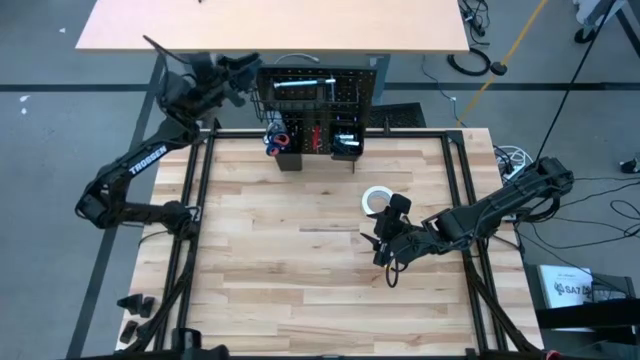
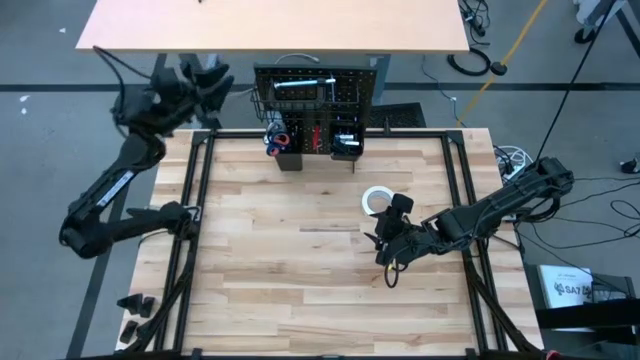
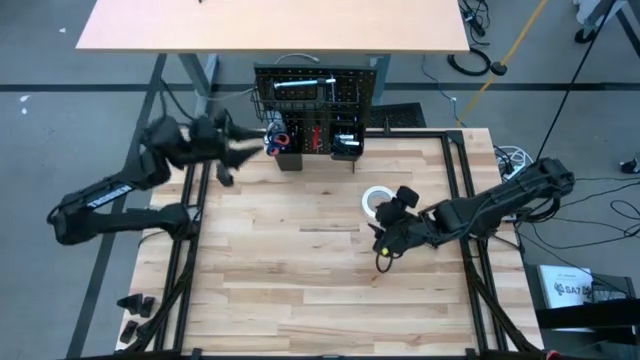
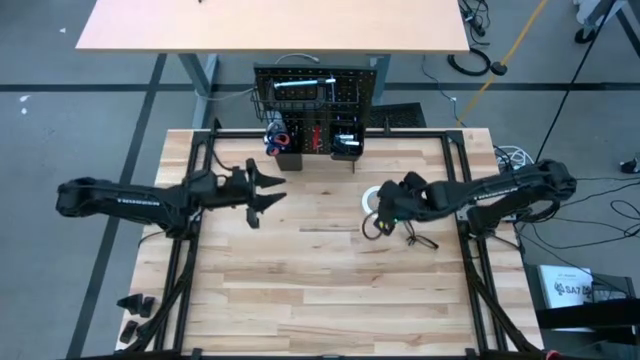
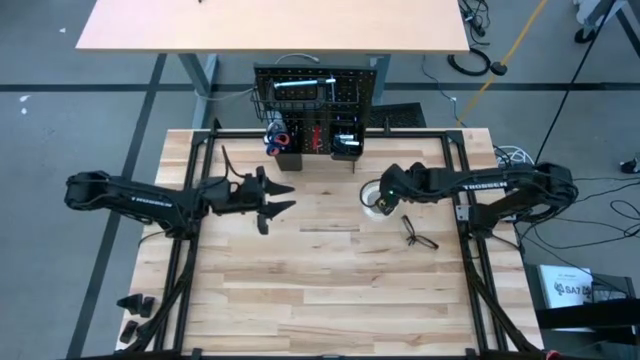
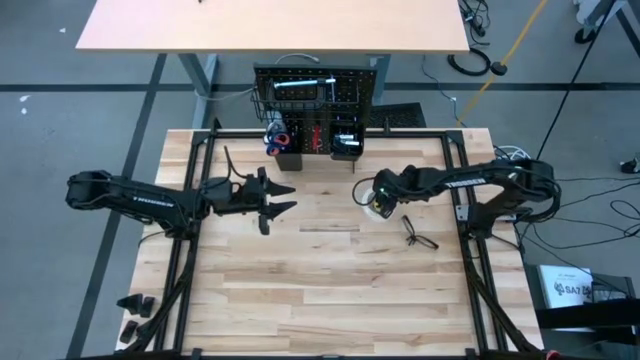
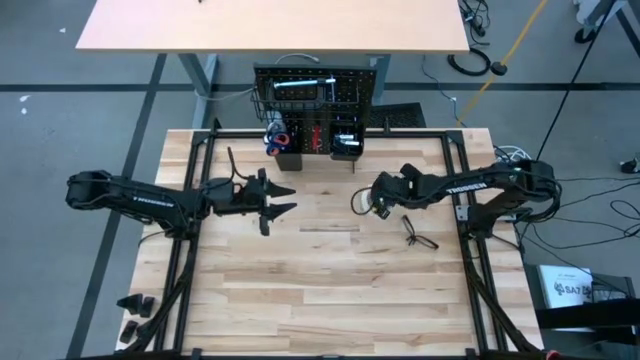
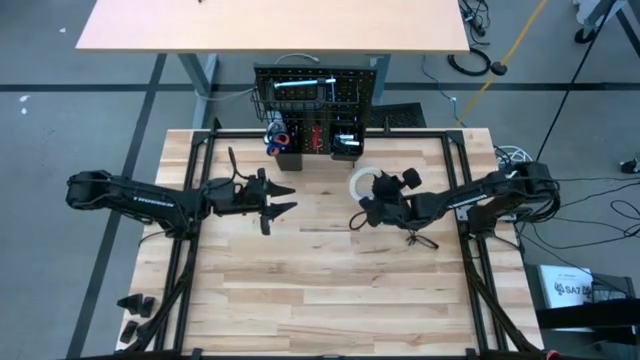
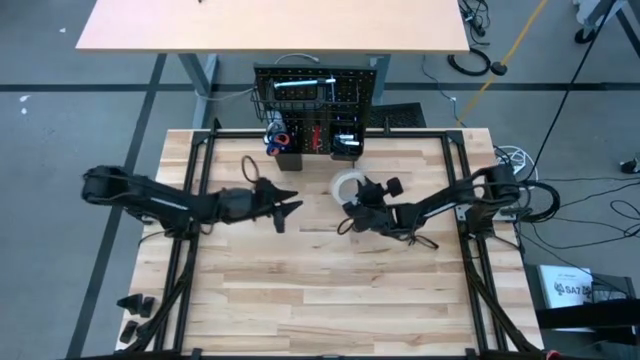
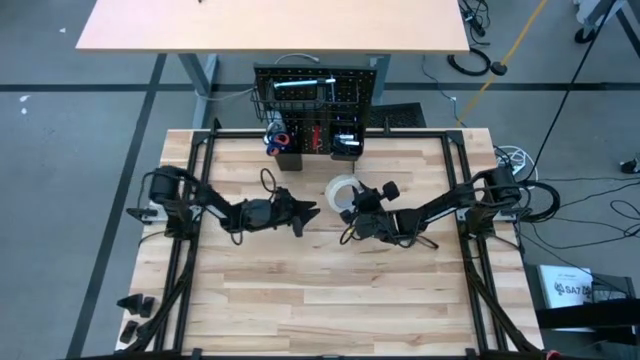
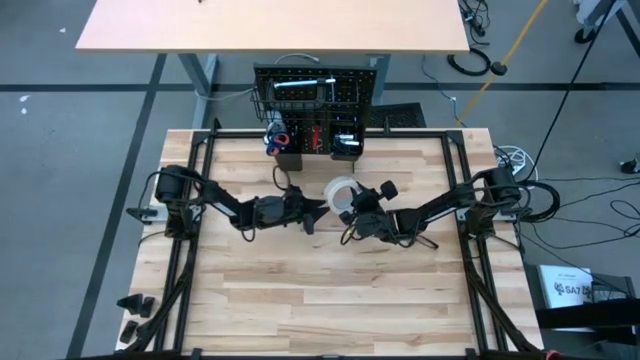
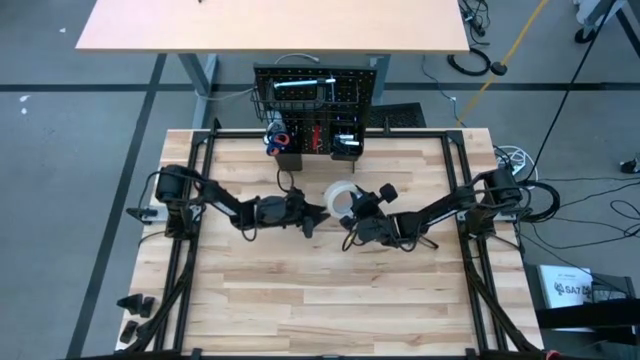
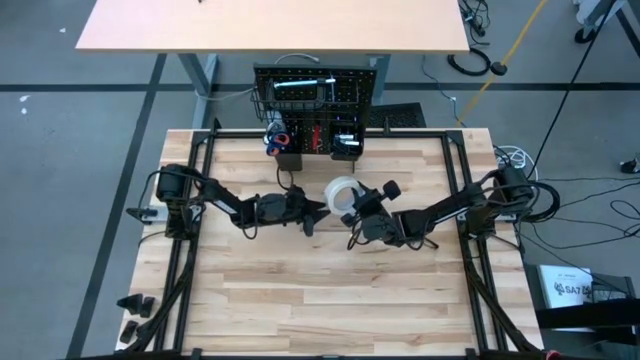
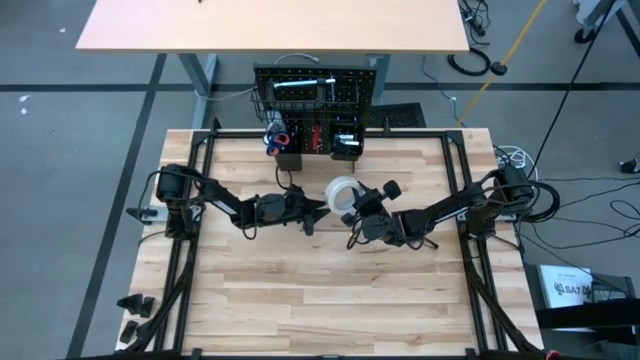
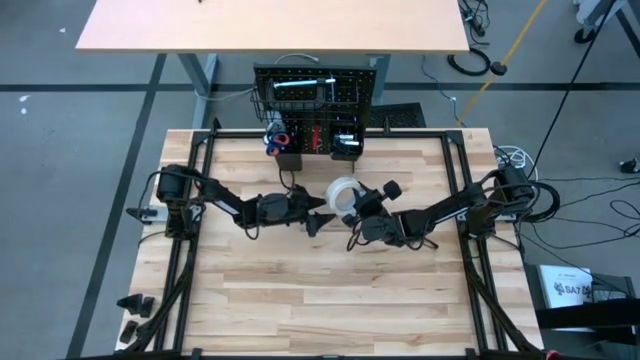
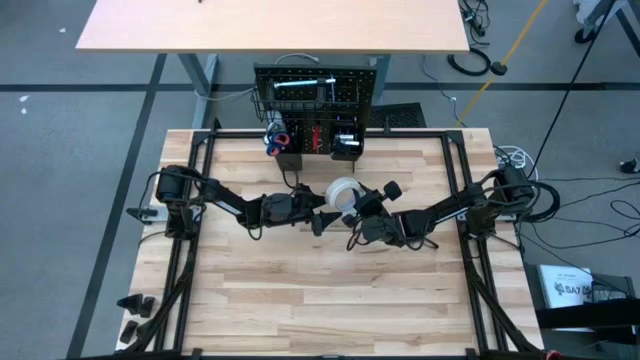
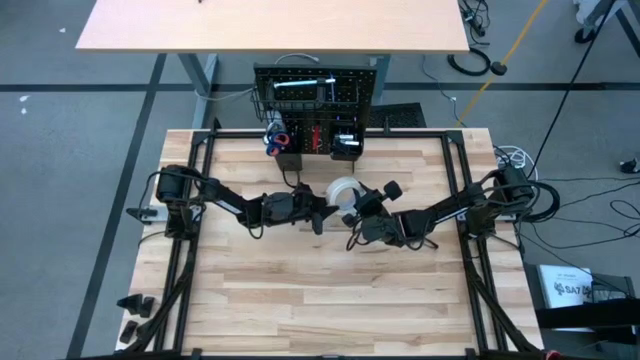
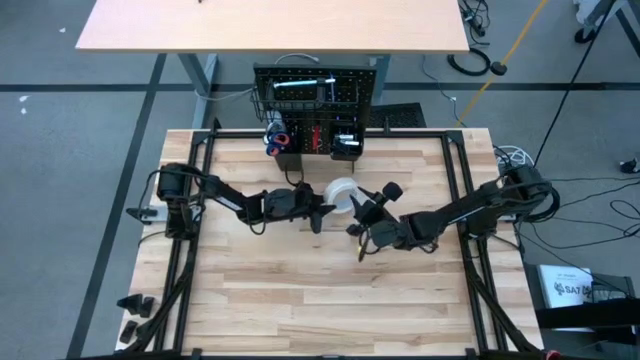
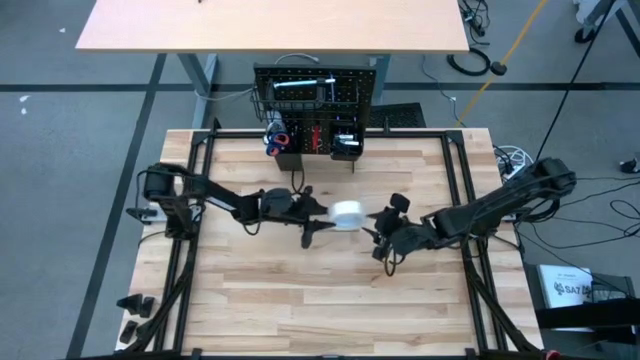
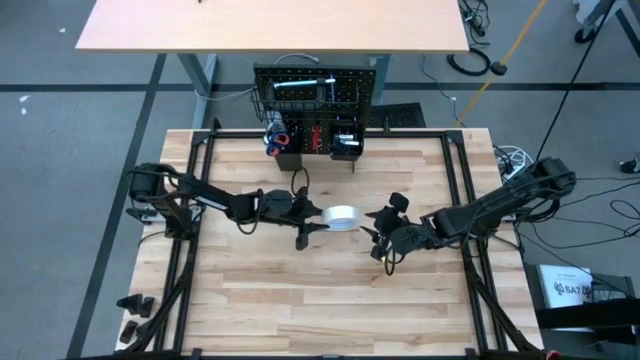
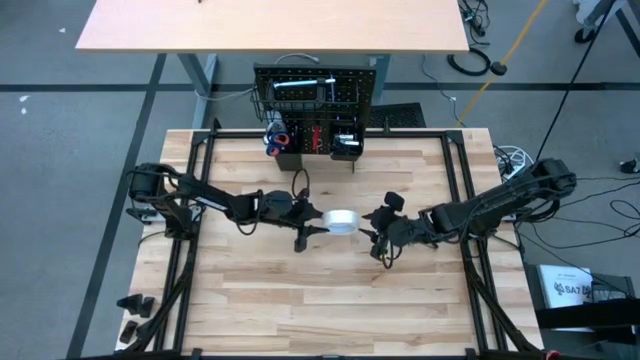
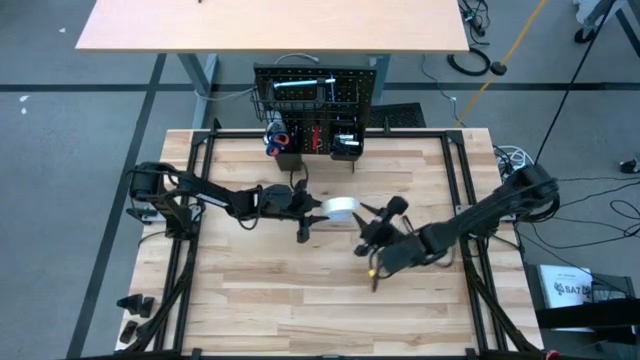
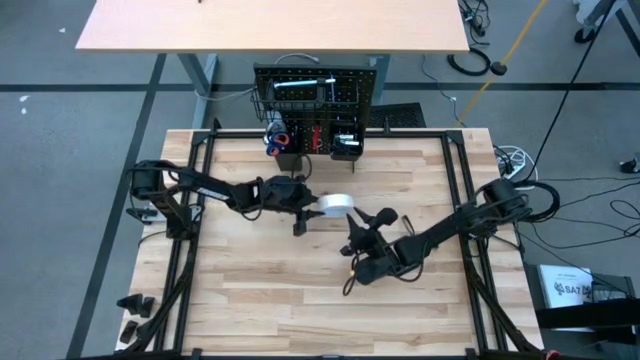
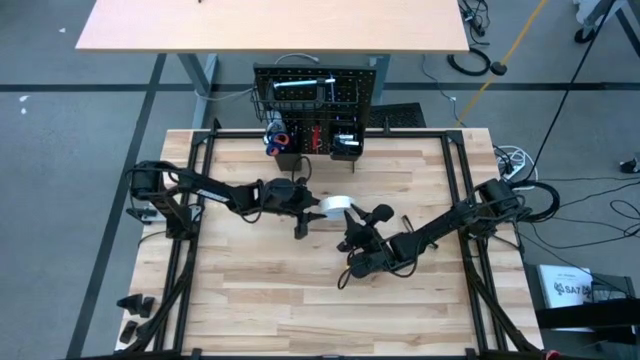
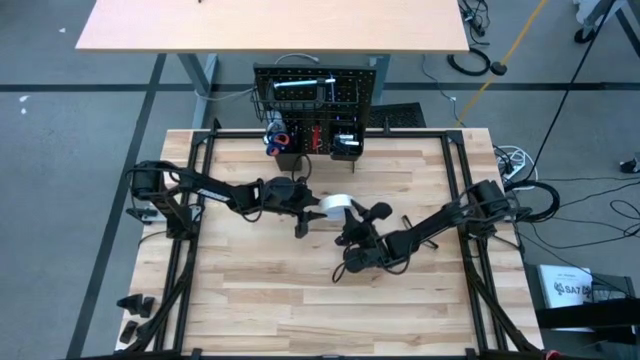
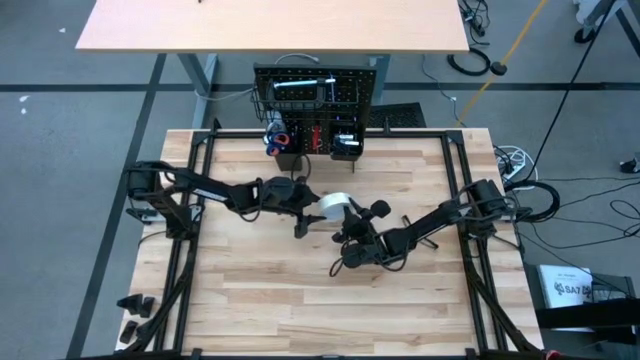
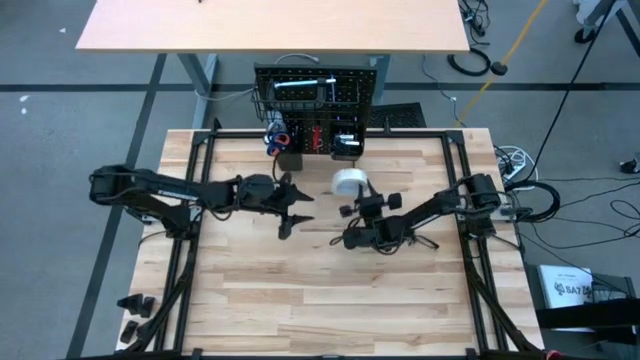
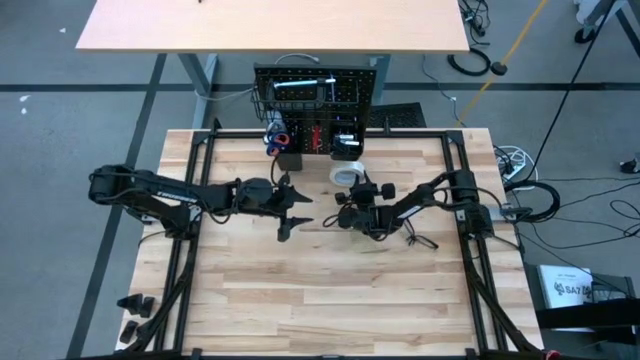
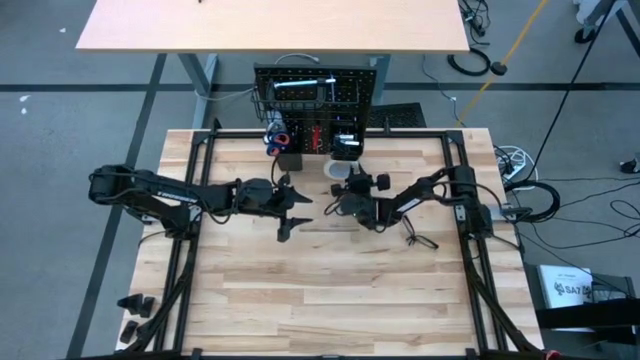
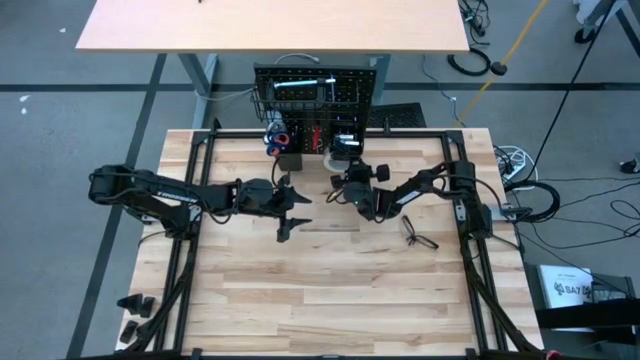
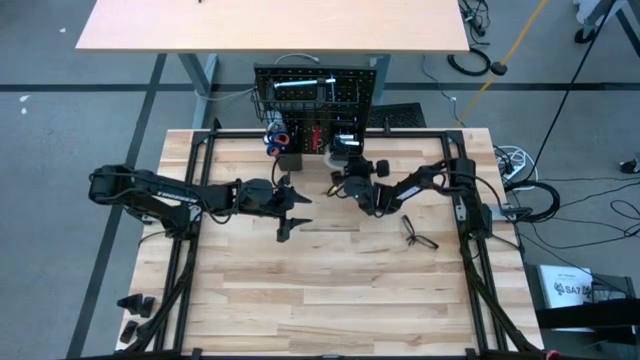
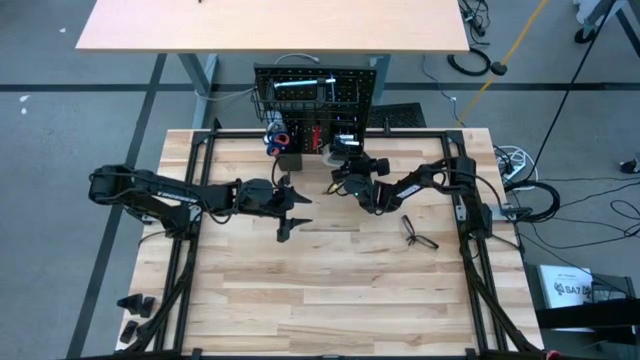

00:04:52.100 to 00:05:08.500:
Task: Hang tools onto peg board
Hang the masking tape on the pegboard
